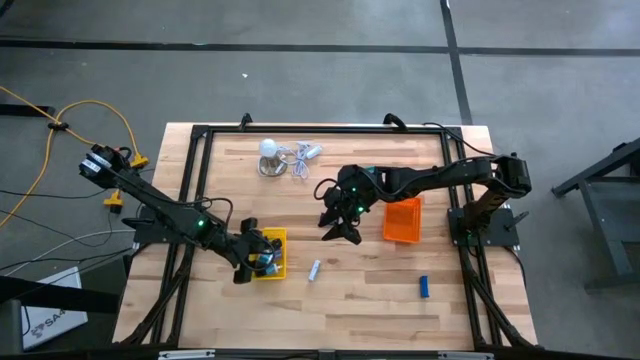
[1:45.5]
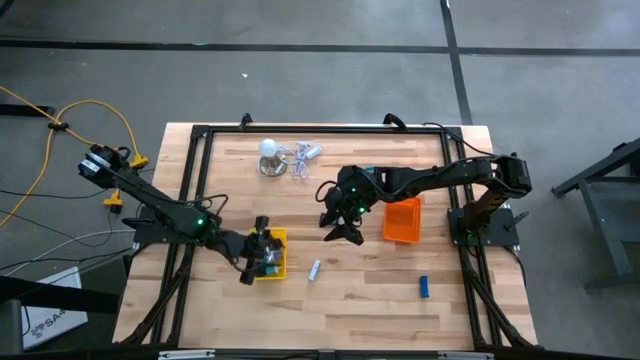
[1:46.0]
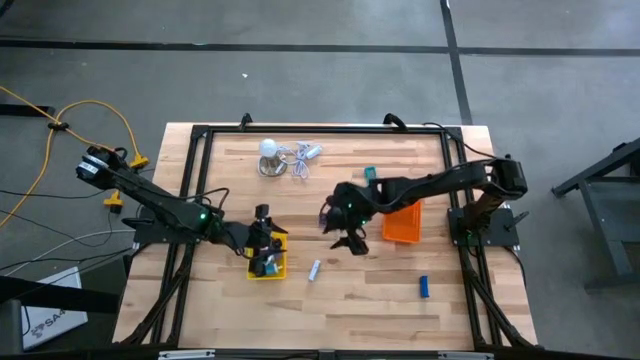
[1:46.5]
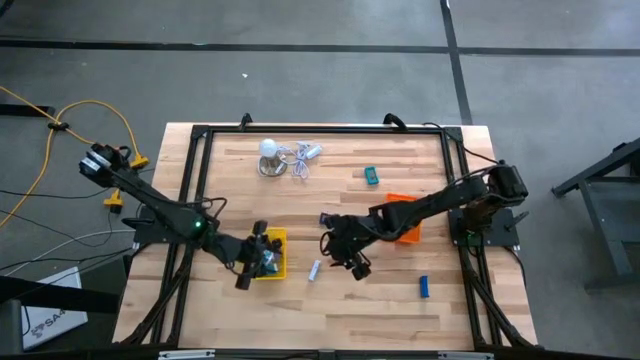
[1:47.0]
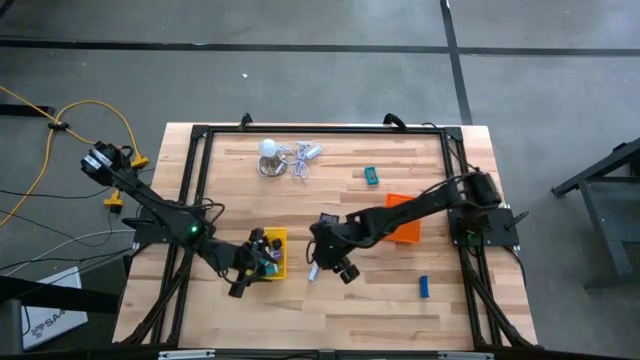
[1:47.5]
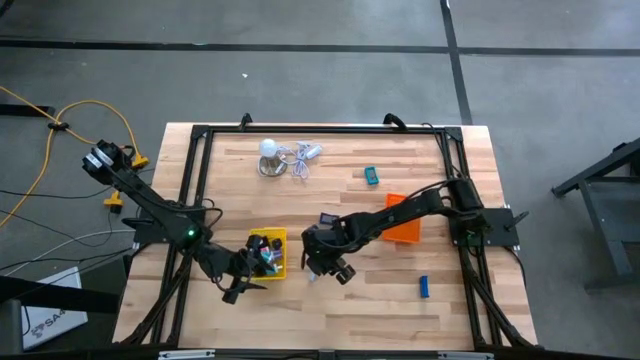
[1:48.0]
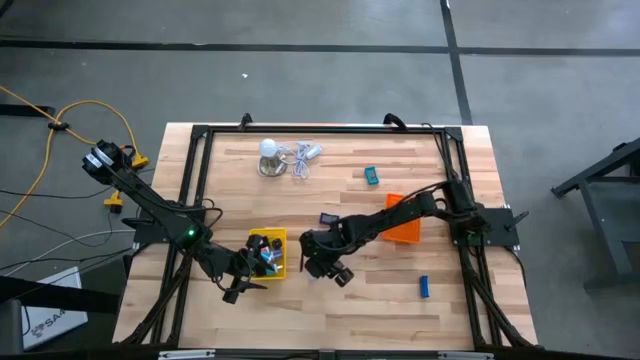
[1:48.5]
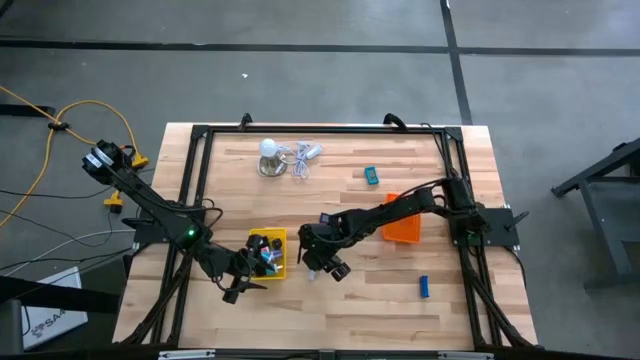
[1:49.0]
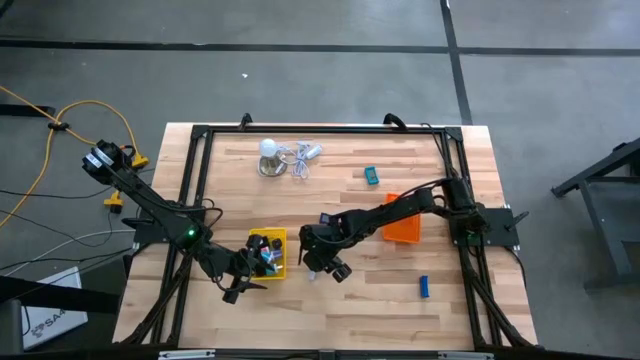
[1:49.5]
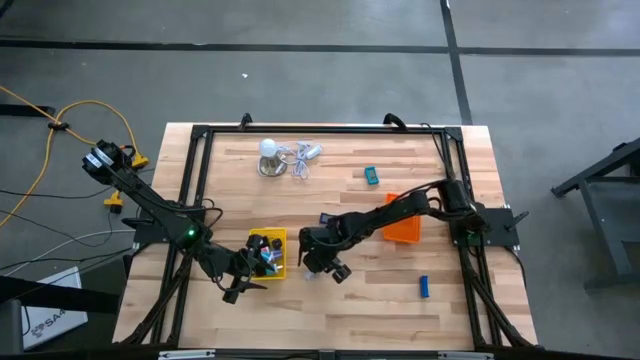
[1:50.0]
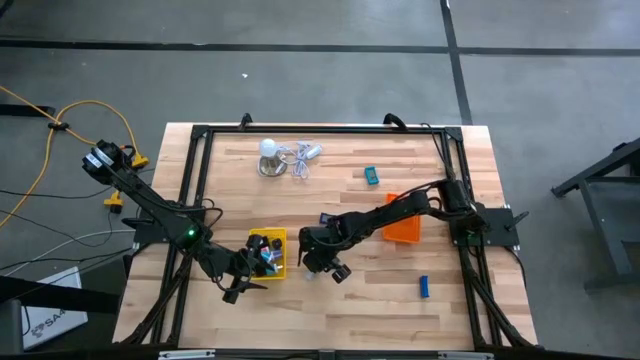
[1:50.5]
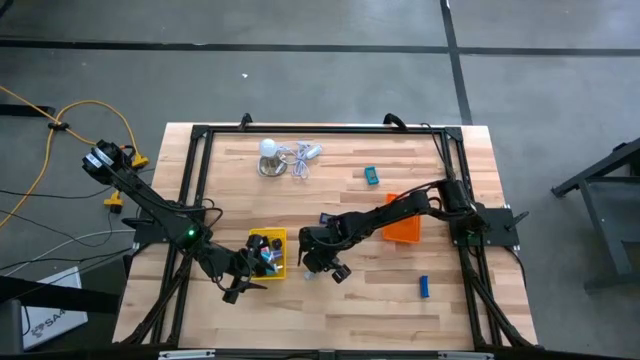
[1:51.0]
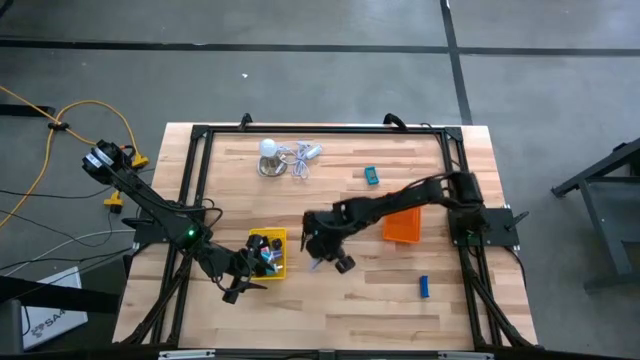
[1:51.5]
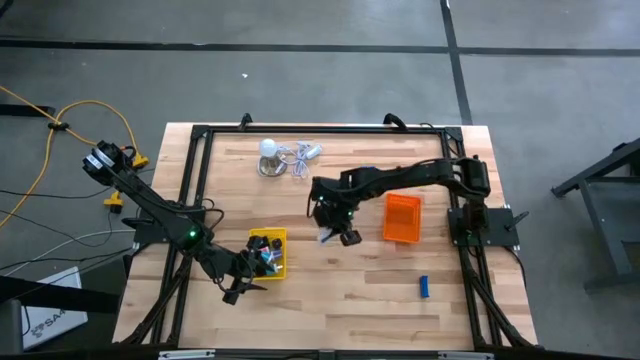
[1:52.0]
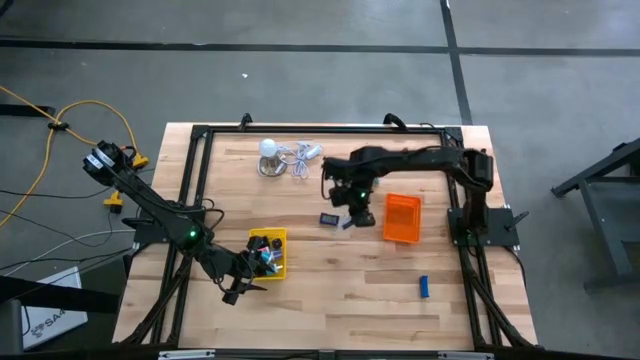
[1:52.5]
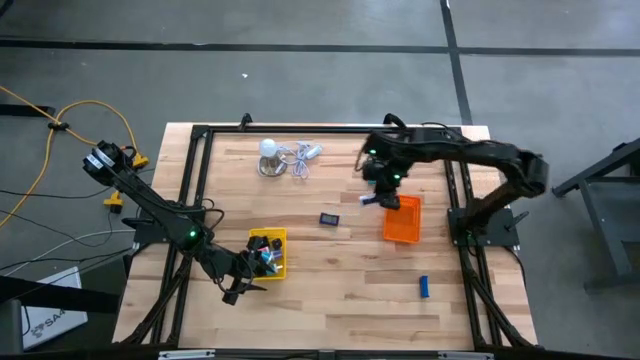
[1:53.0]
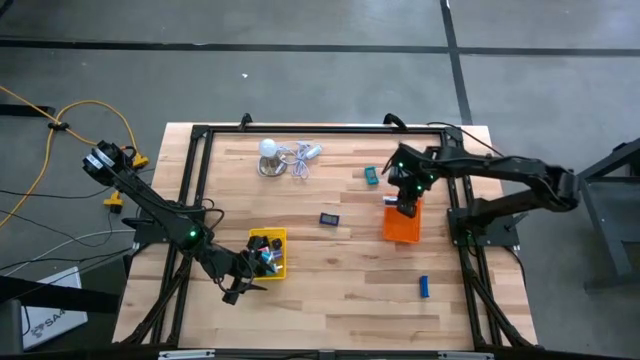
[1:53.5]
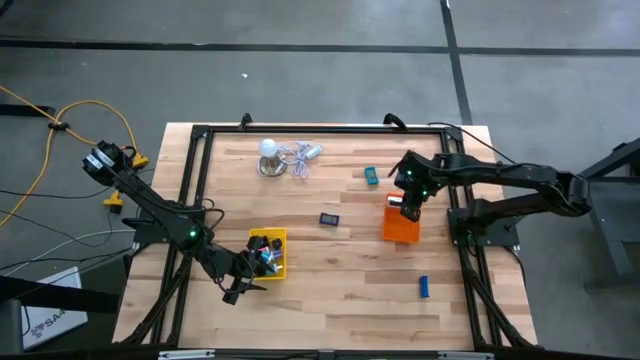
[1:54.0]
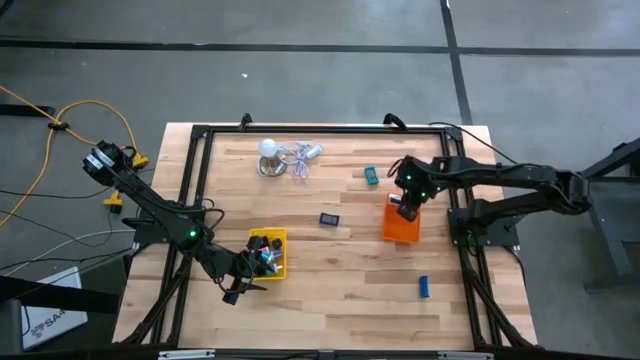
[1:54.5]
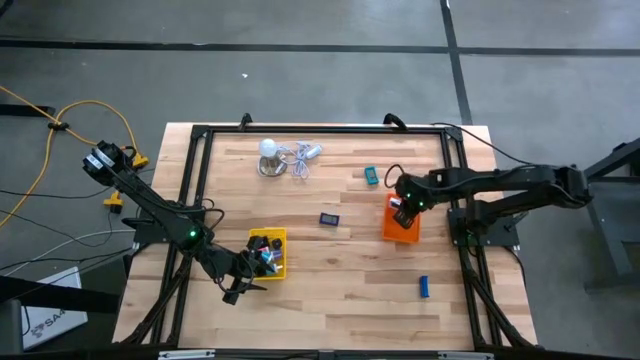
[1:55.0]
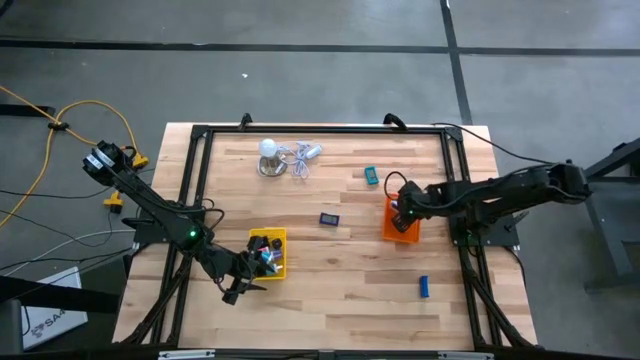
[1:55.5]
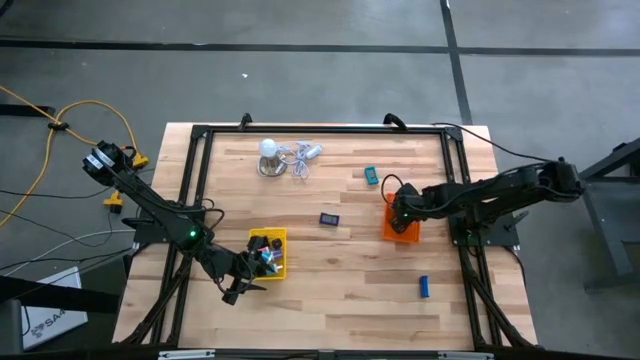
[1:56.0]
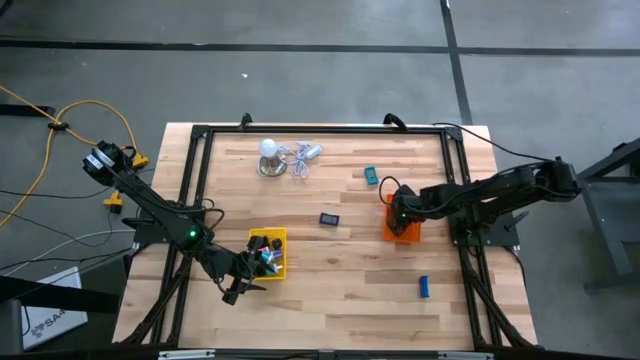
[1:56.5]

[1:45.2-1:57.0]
Task: Pick & Place Office items
Put the white digital clock into the orange bin

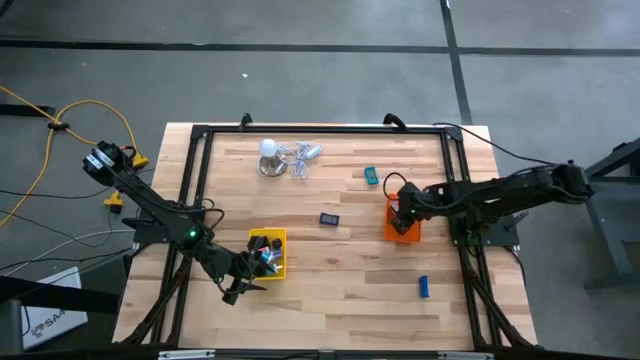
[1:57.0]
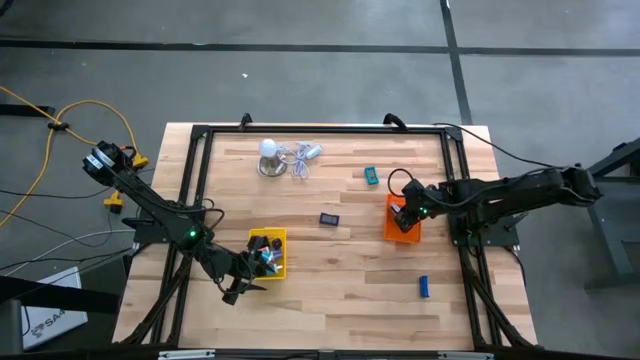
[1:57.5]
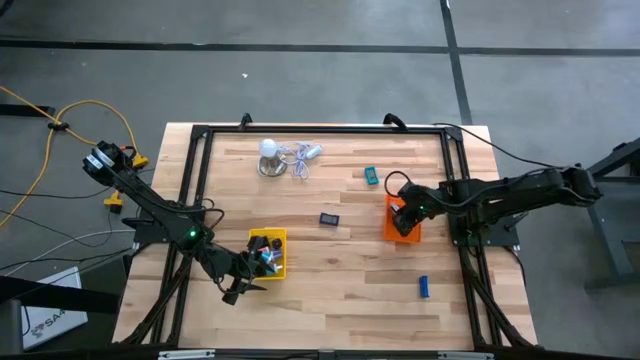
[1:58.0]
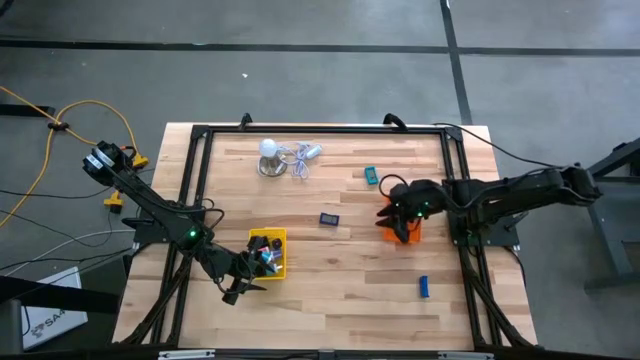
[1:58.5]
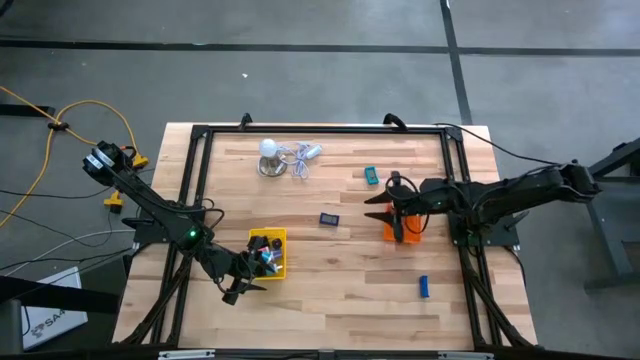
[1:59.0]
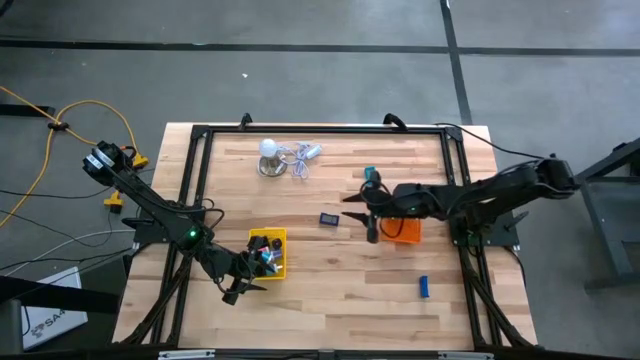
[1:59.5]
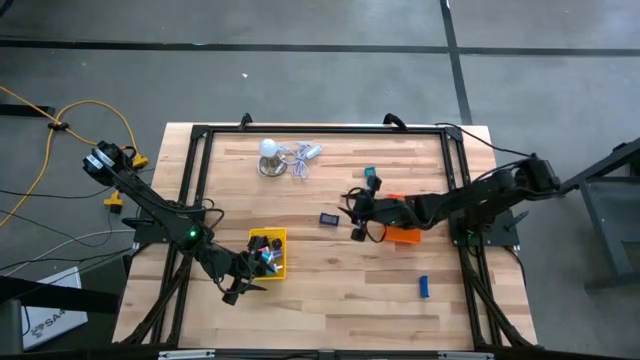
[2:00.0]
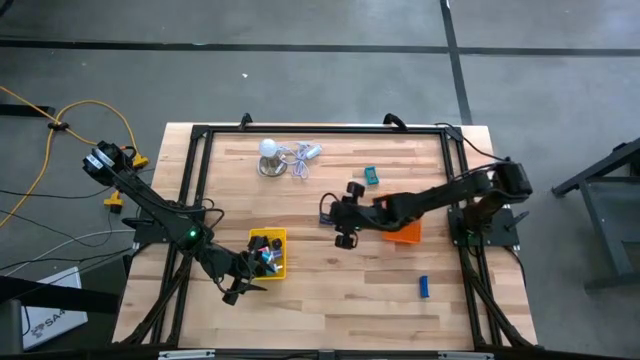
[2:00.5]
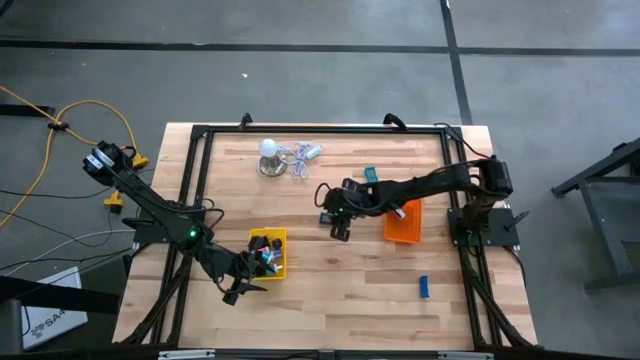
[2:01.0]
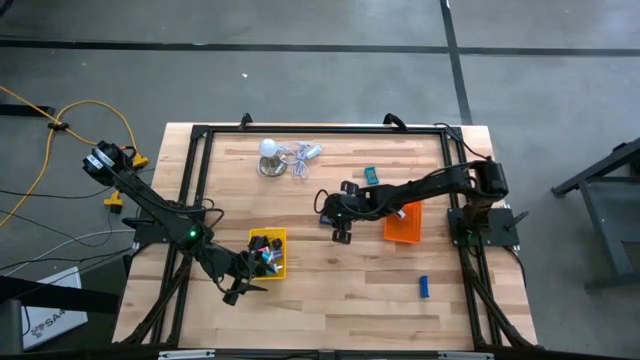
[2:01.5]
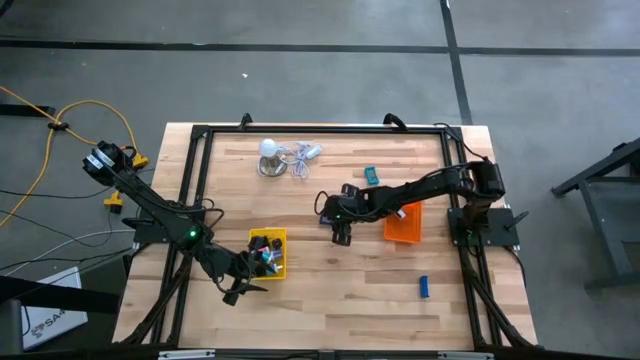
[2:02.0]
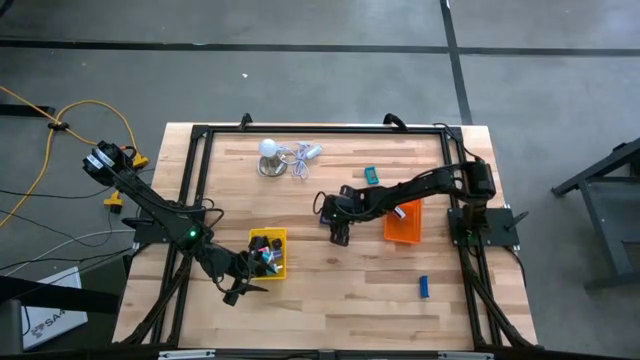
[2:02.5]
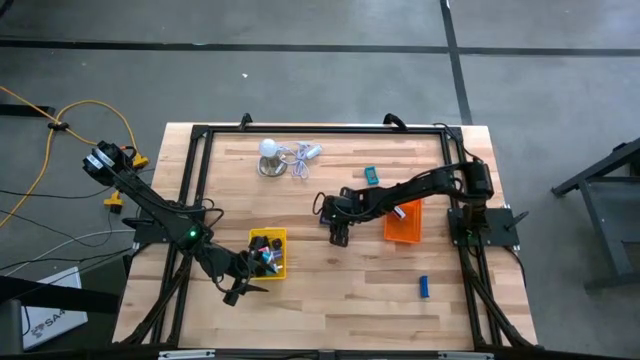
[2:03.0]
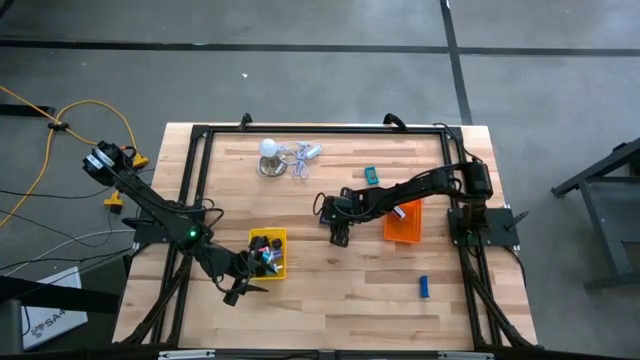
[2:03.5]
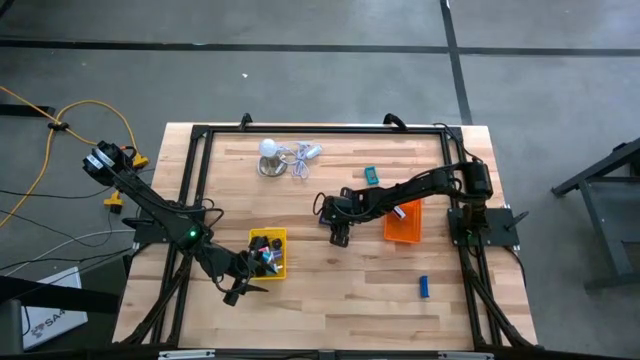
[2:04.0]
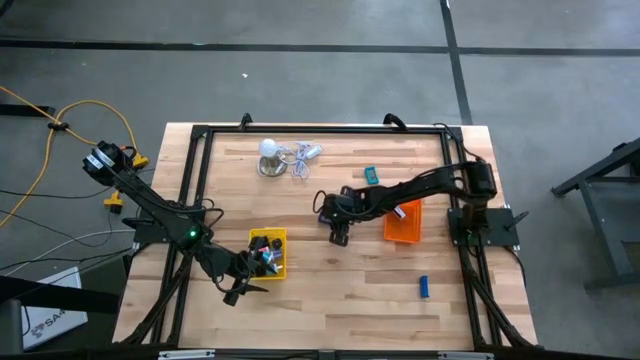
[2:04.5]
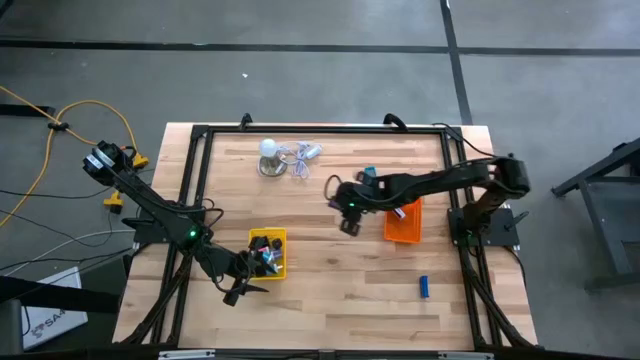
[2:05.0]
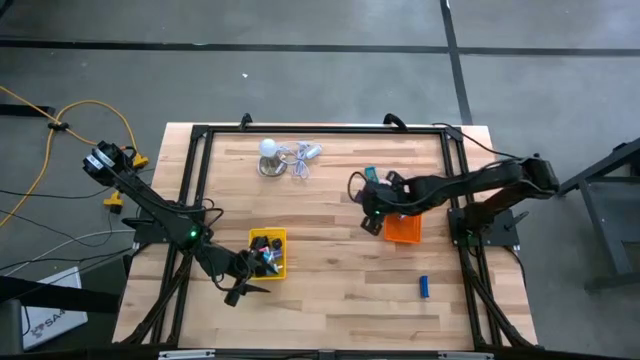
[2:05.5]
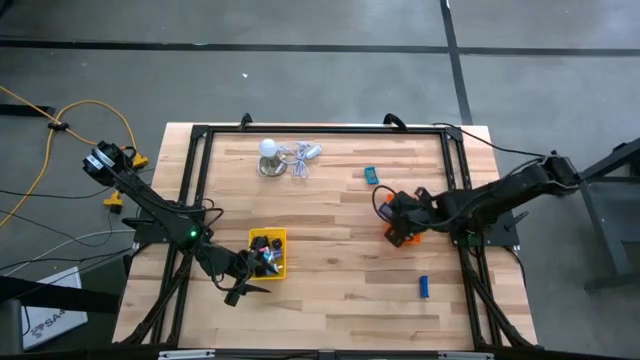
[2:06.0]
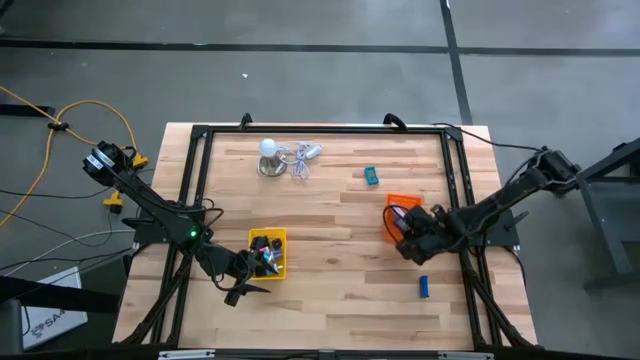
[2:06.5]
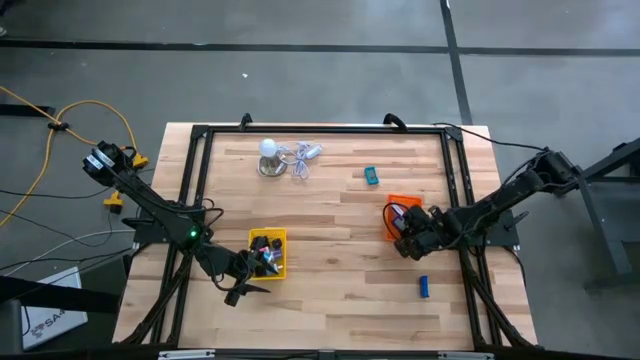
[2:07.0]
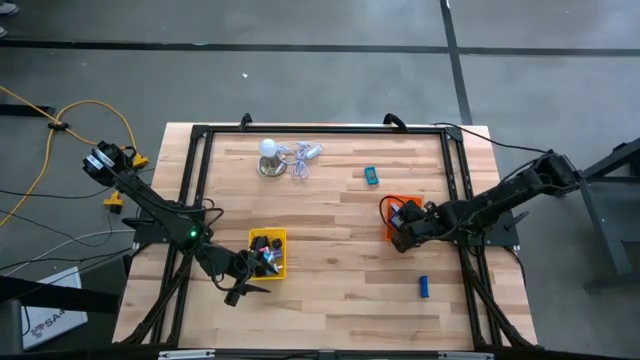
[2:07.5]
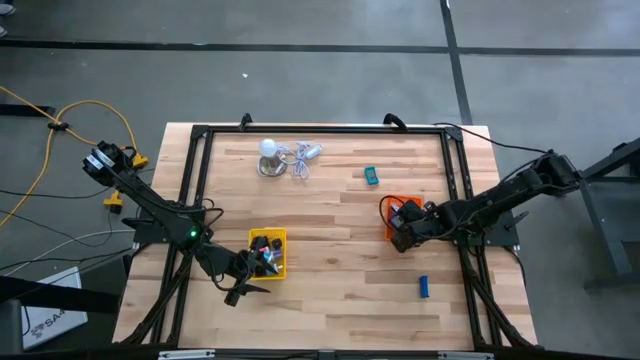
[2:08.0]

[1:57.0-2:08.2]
Put the top dark blue digital clock into the orange bin
